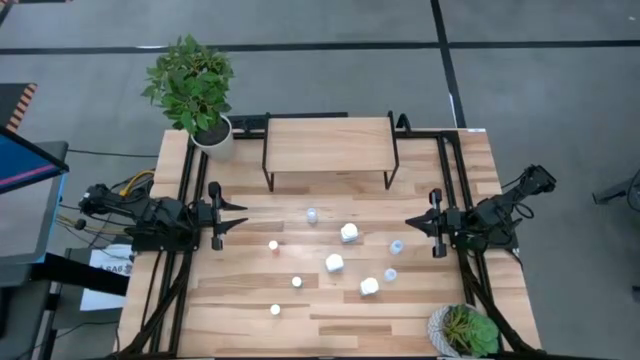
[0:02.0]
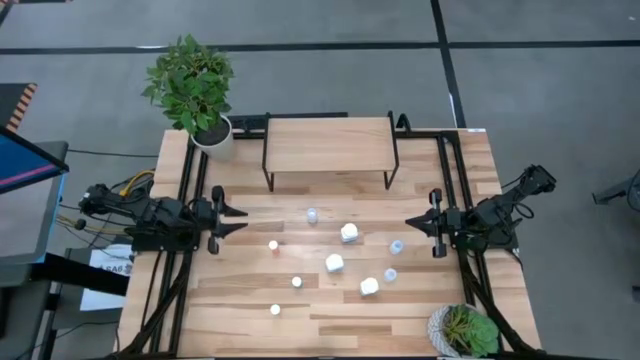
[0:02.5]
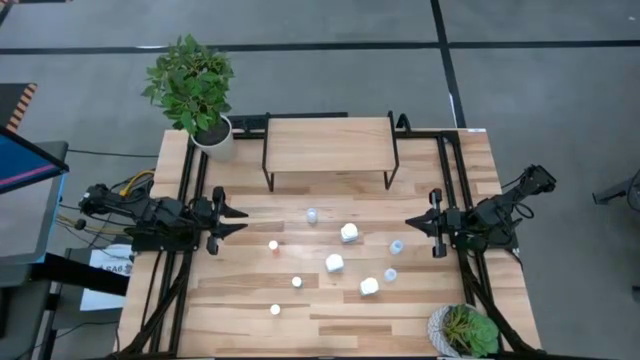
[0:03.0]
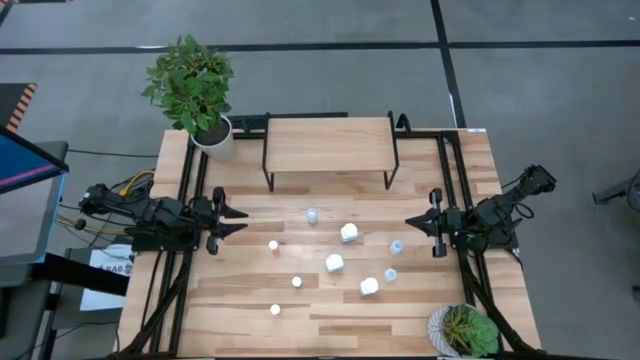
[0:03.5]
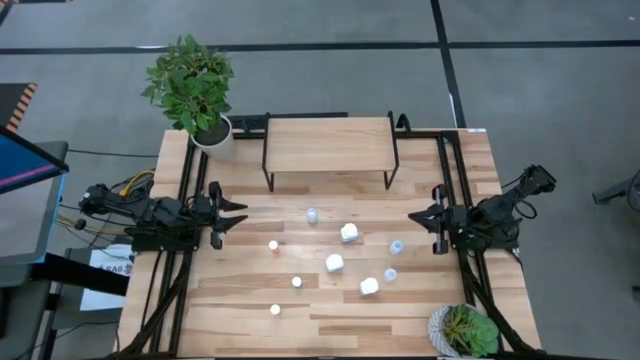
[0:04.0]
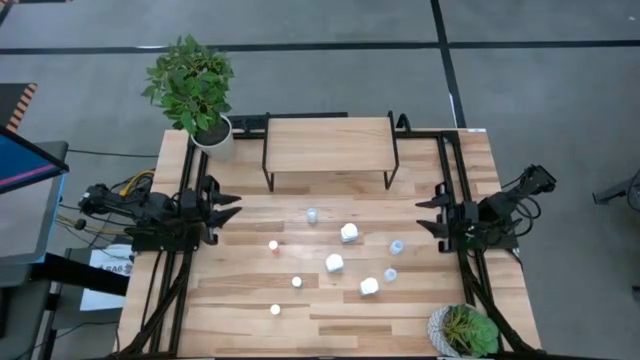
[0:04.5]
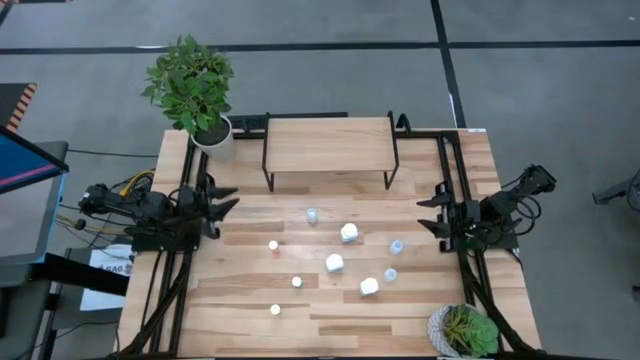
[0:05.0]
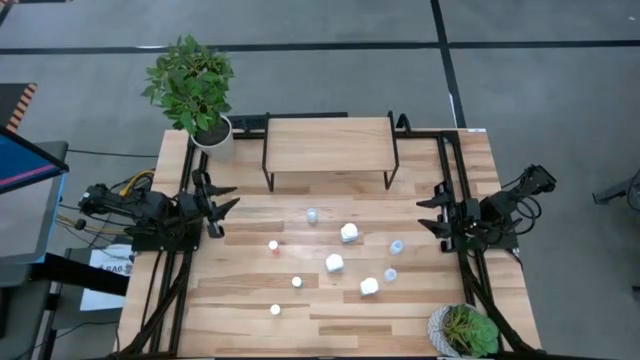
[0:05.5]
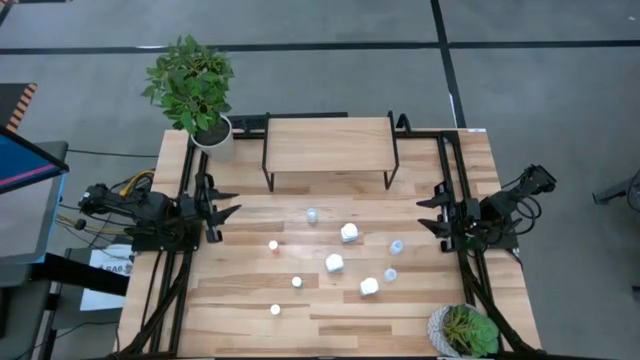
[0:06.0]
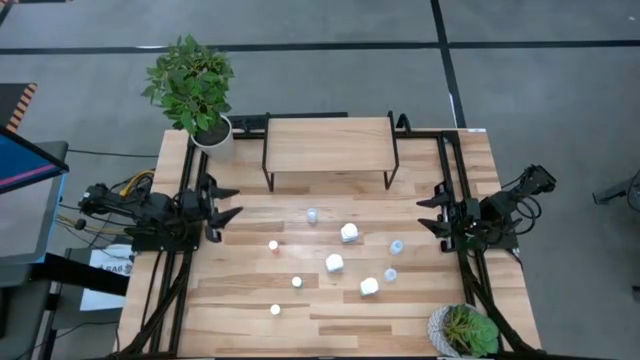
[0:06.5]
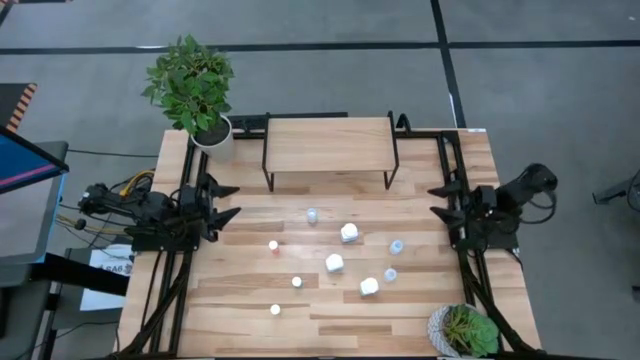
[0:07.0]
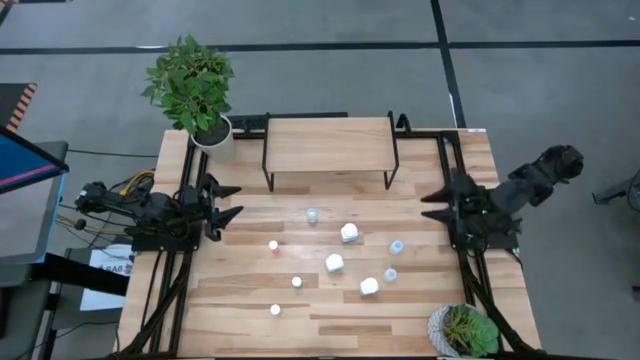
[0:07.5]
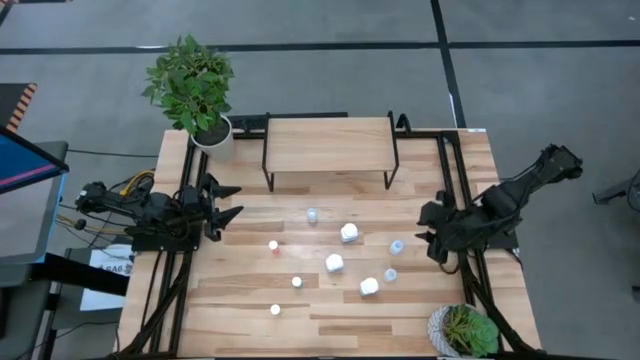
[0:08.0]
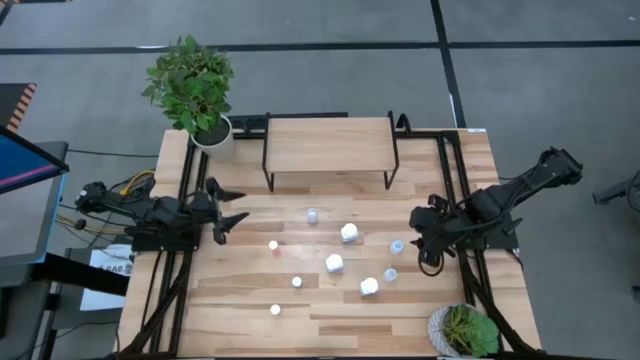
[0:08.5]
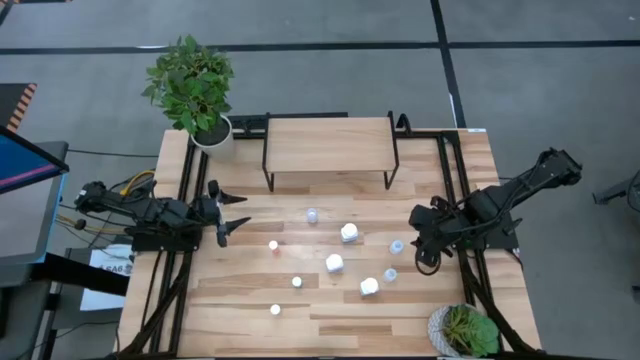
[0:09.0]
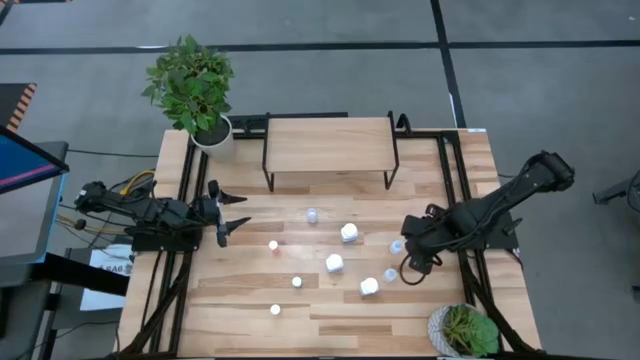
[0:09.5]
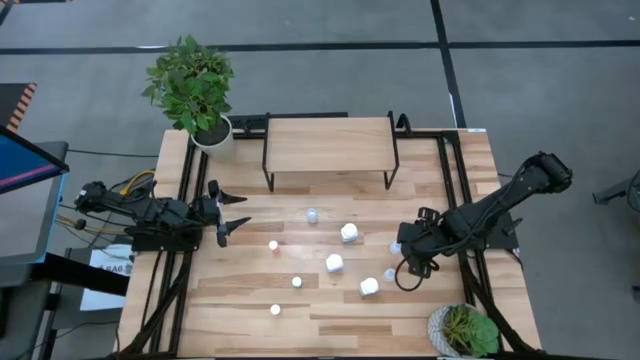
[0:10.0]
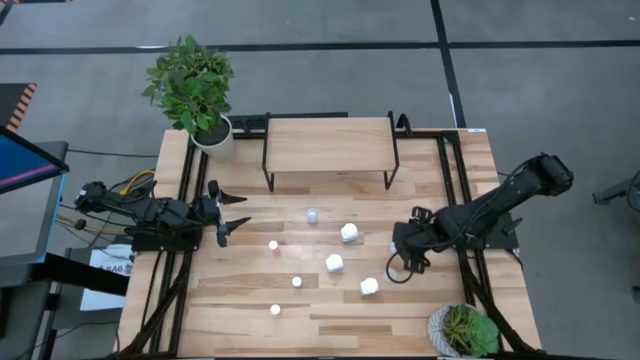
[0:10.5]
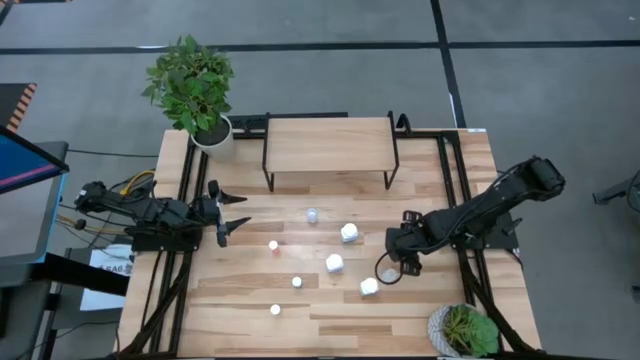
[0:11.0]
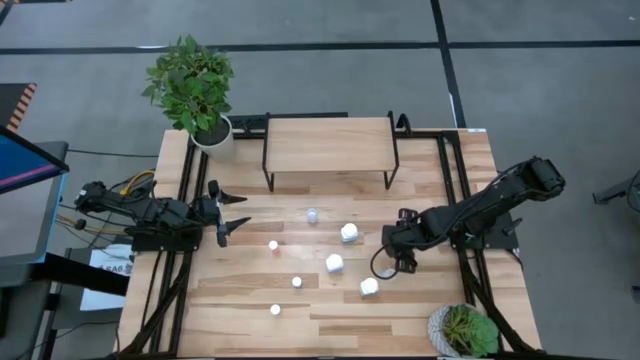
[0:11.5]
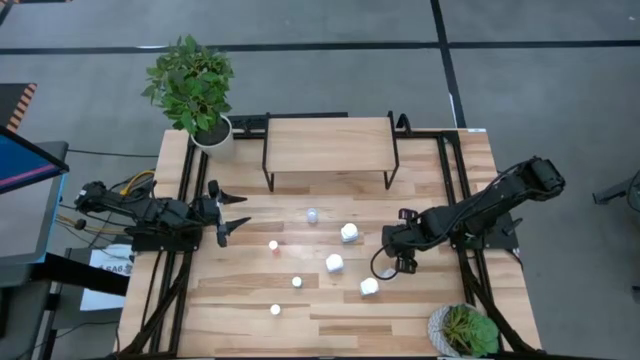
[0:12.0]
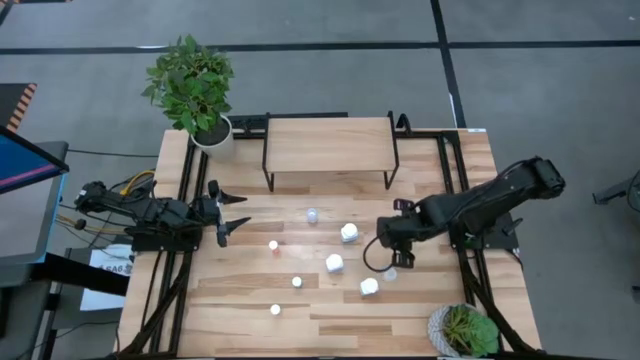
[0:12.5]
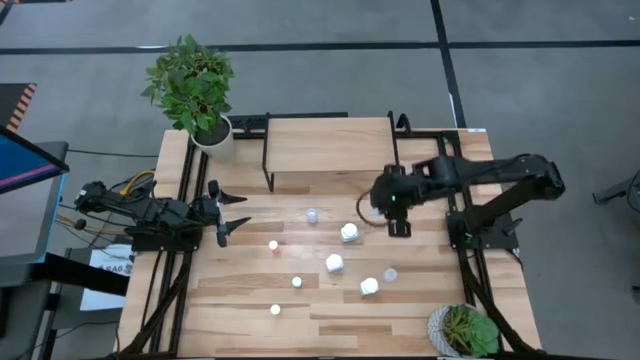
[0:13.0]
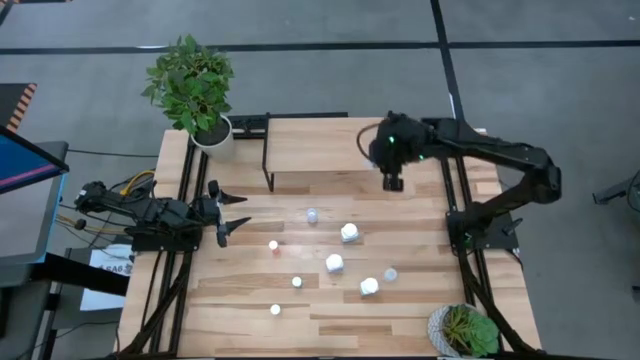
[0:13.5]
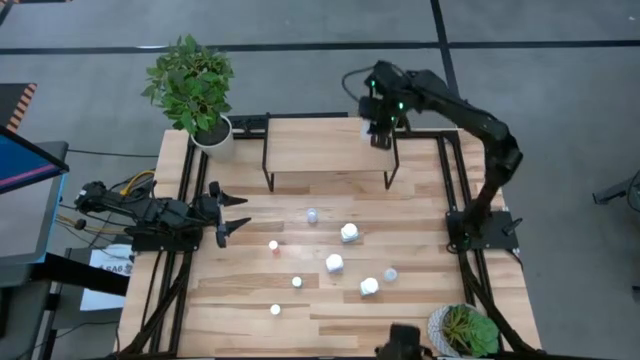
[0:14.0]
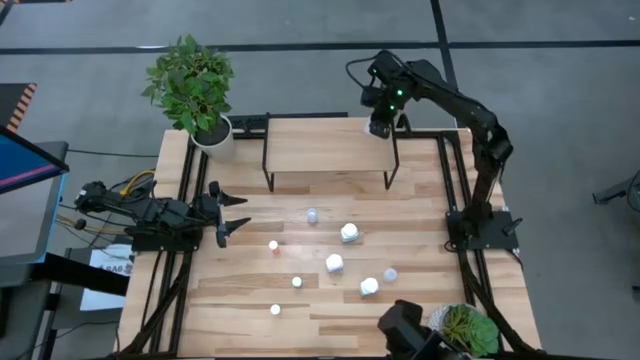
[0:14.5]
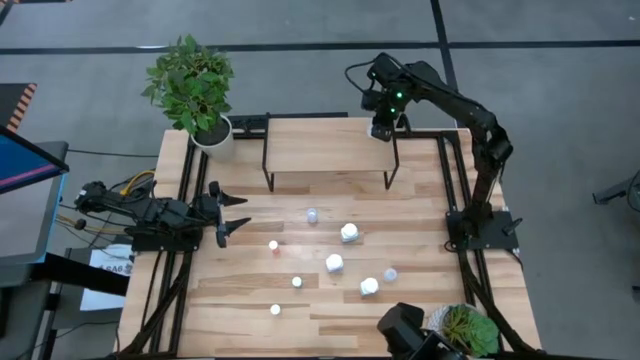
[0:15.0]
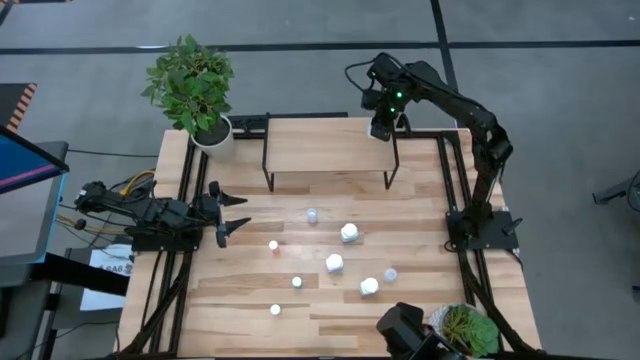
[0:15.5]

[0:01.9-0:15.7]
Task: Pick and place medicine bottles onto shelf by color
Put the middle right transparent medicine bottle on the shelf

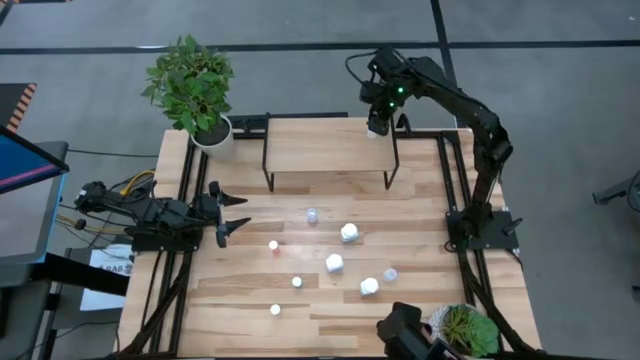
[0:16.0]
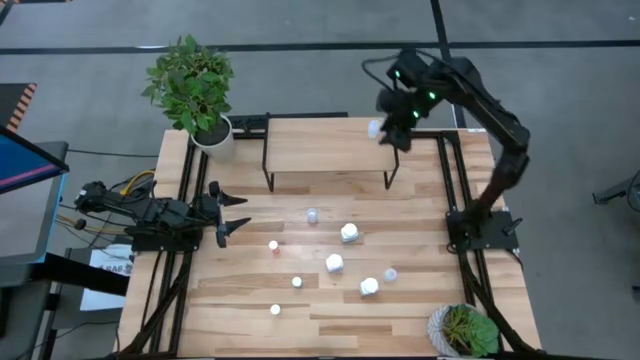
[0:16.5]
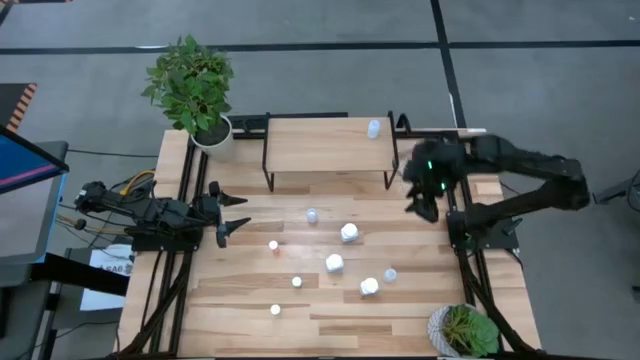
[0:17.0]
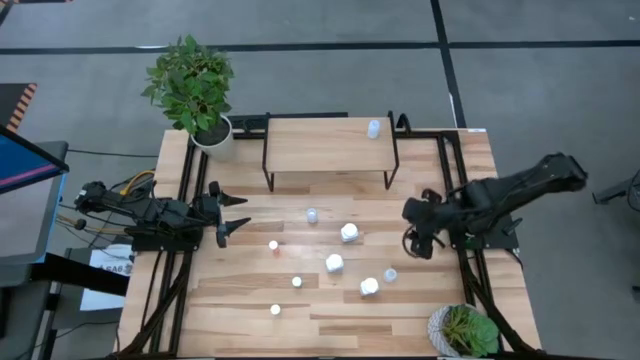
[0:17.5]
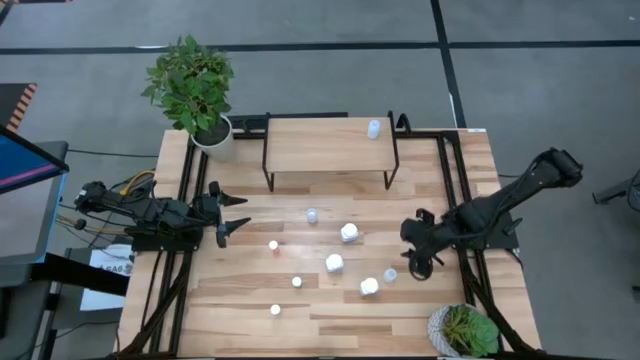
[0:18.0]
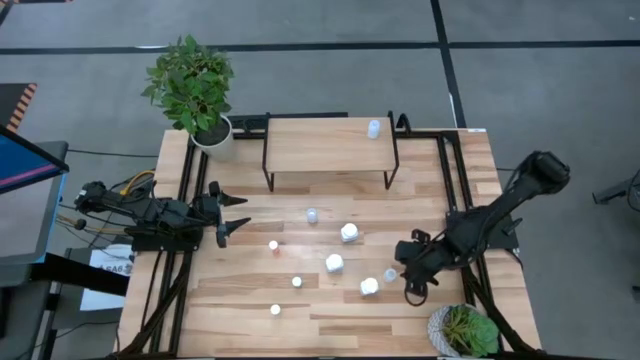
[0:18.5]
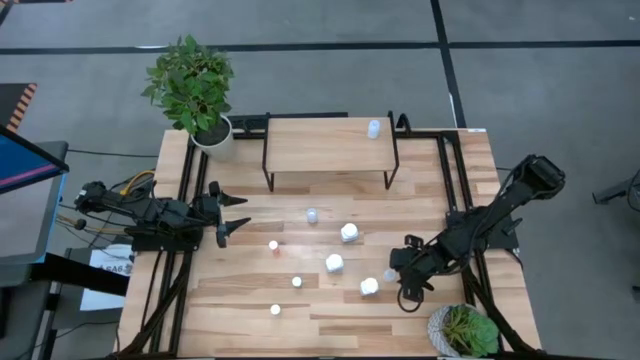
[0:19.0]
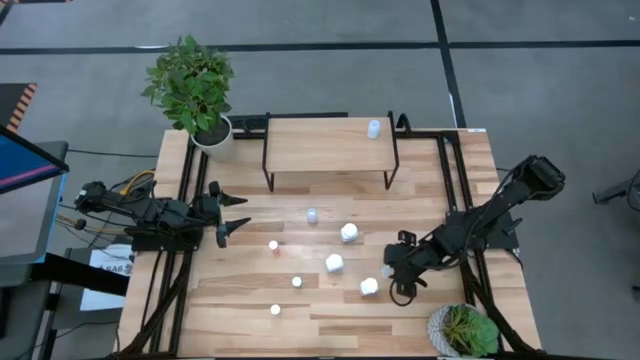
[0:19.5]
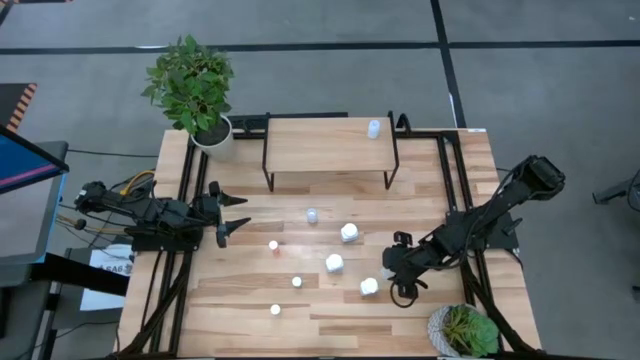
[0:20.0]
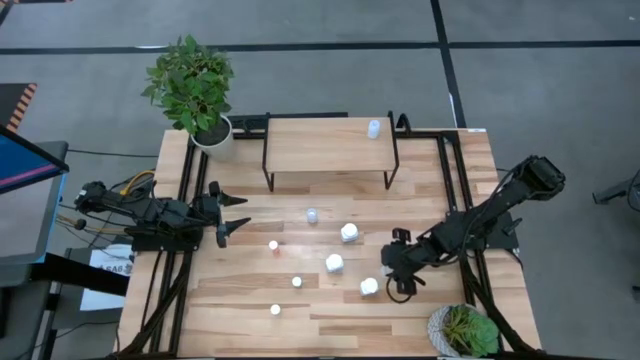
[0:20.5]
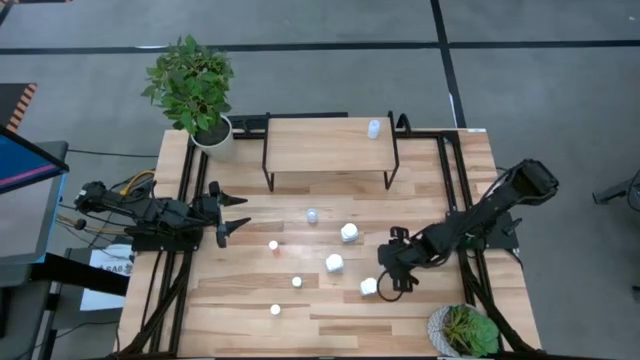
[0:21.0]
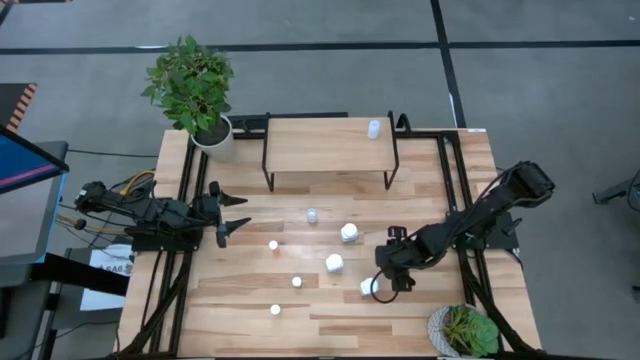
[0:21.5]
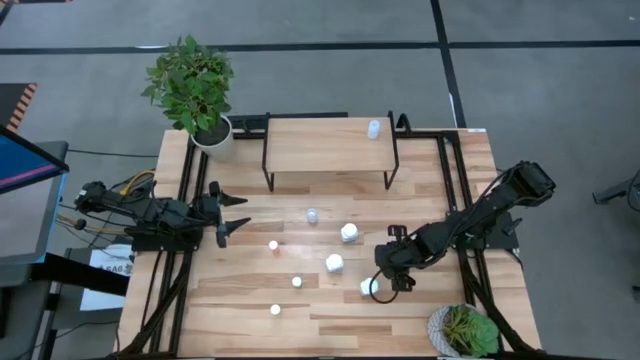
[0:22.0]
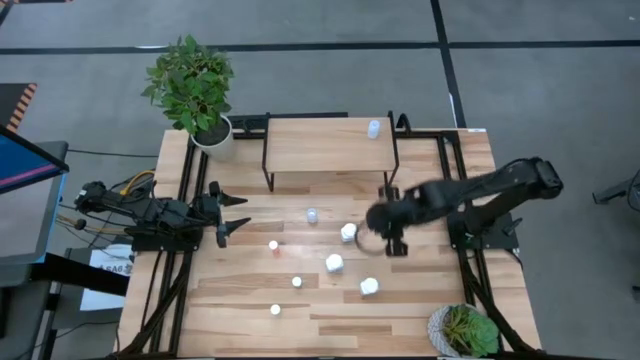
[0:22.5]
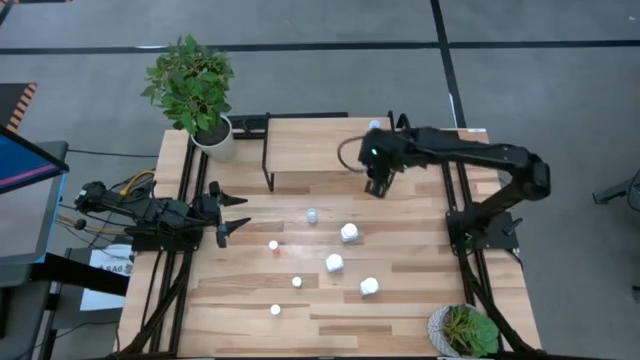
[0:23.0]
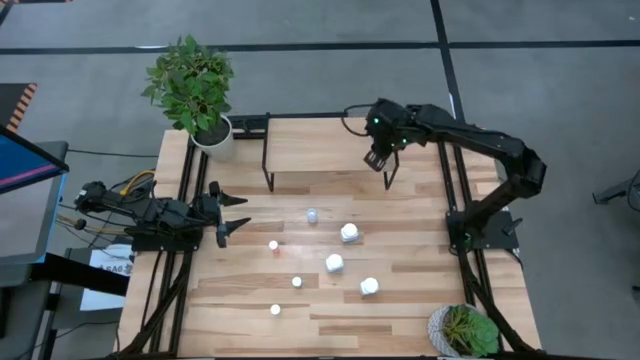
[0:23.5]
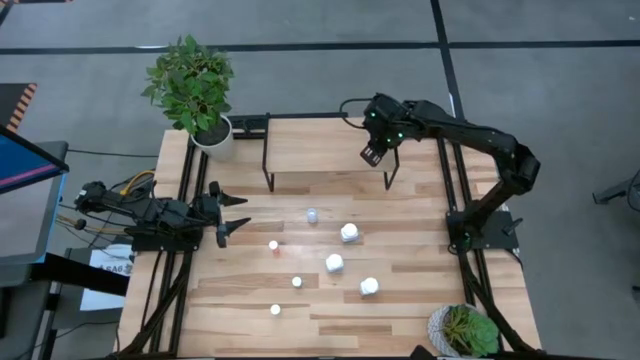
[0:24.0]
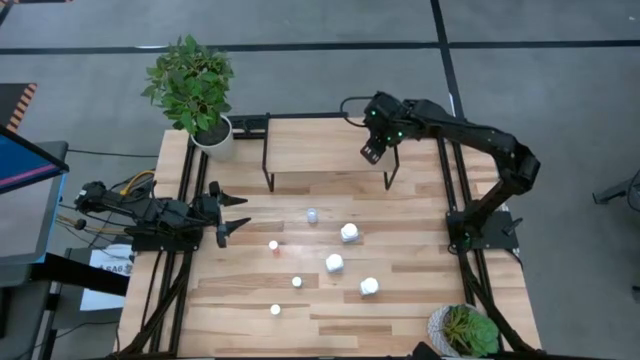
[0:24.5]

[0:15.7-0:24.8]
Put the bottom transparent medicine bottle on the shelf aligned with the other transparent medicine bottle
